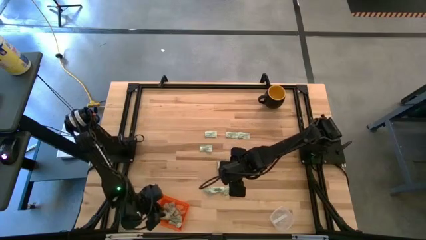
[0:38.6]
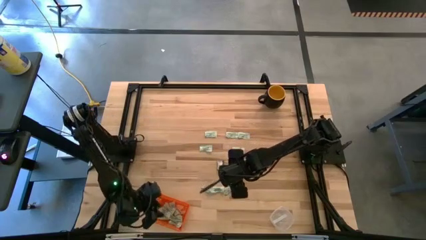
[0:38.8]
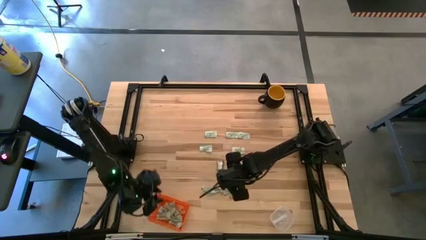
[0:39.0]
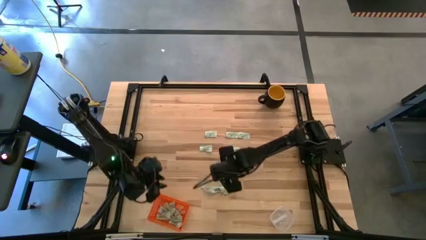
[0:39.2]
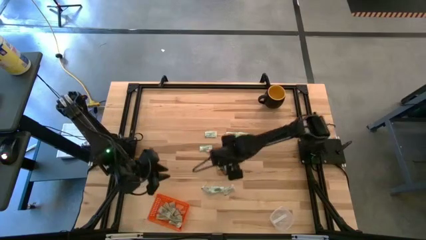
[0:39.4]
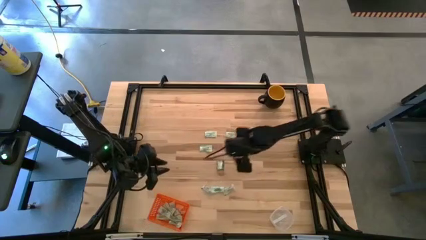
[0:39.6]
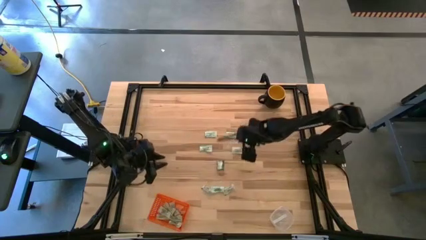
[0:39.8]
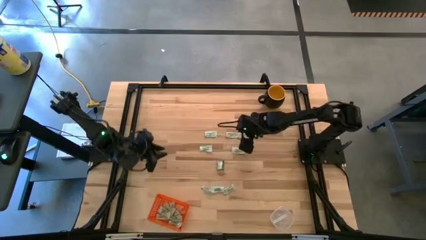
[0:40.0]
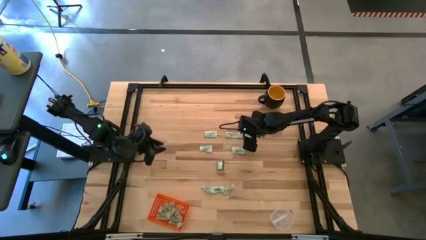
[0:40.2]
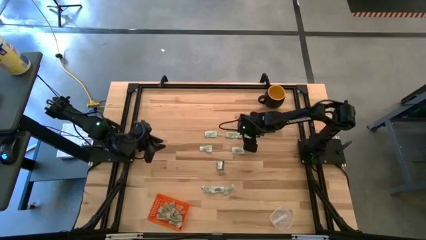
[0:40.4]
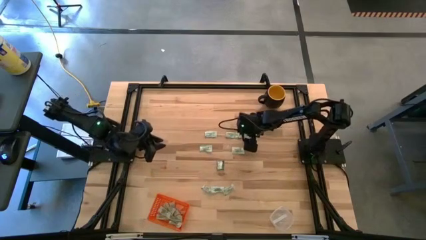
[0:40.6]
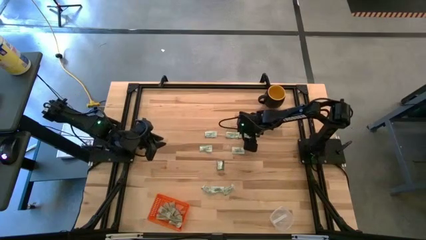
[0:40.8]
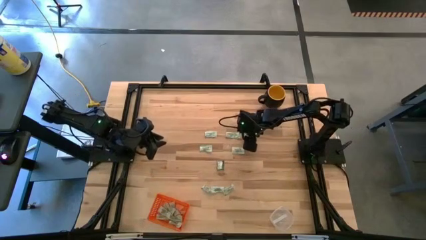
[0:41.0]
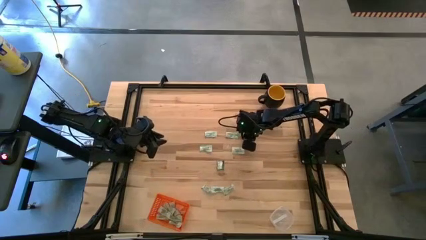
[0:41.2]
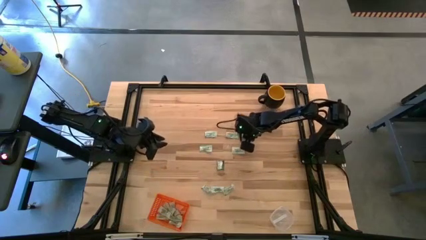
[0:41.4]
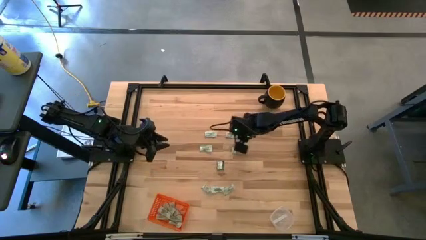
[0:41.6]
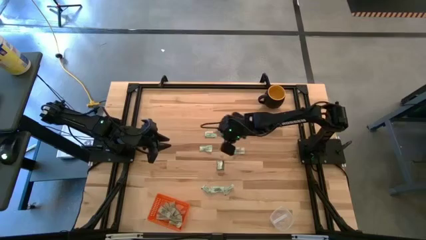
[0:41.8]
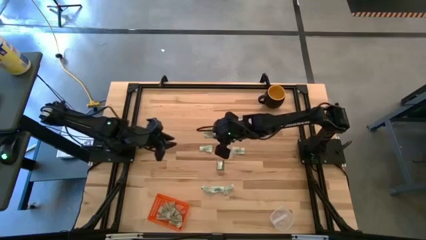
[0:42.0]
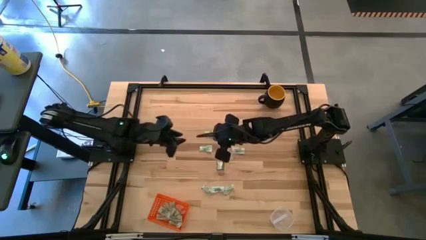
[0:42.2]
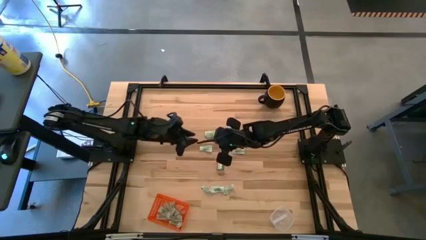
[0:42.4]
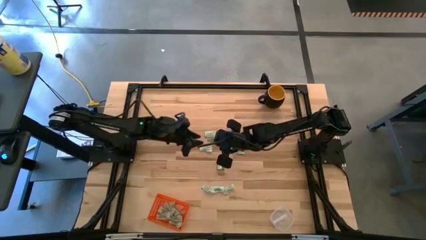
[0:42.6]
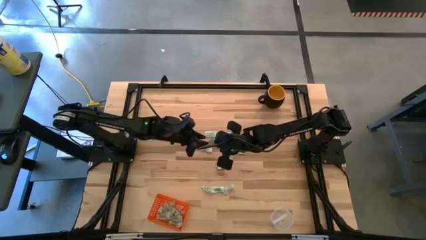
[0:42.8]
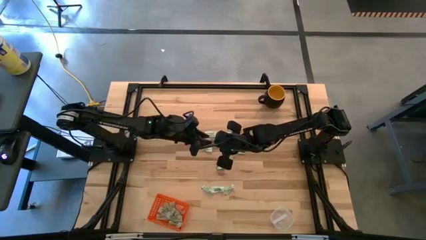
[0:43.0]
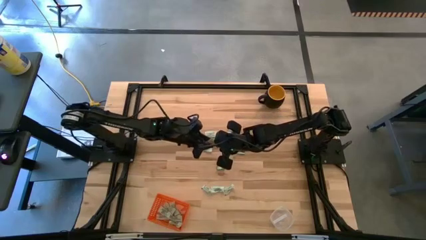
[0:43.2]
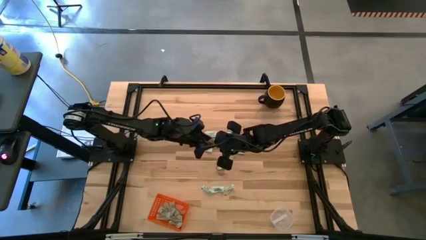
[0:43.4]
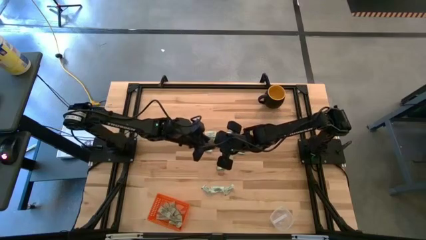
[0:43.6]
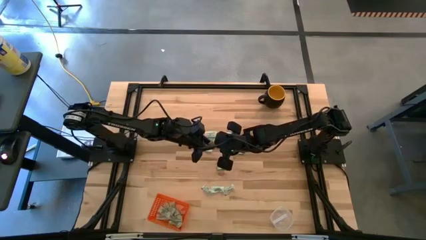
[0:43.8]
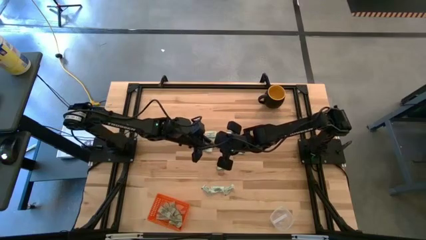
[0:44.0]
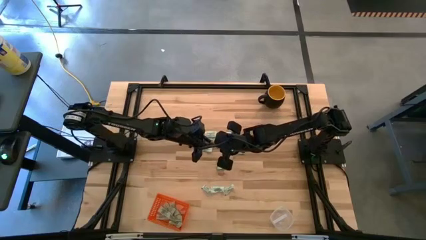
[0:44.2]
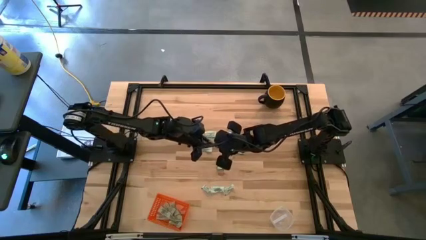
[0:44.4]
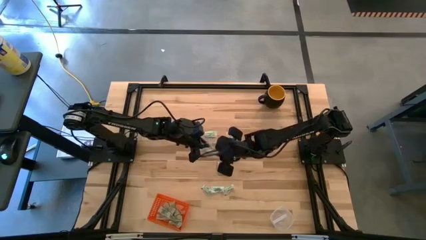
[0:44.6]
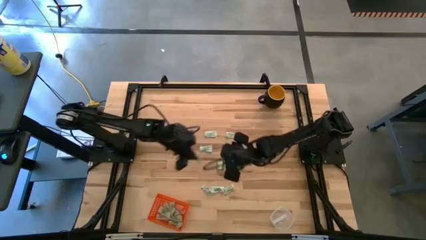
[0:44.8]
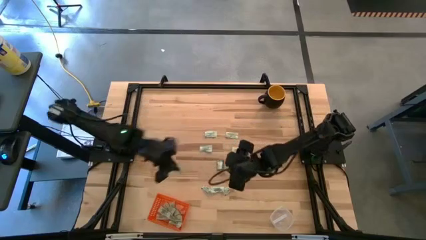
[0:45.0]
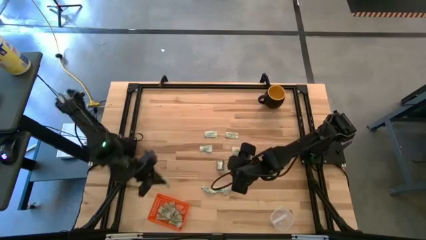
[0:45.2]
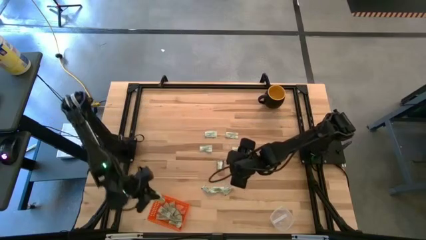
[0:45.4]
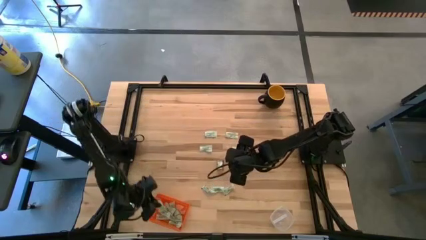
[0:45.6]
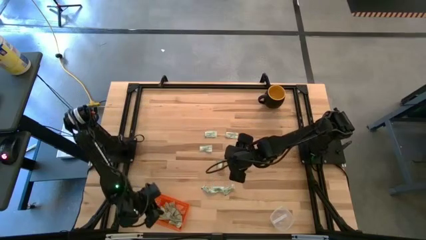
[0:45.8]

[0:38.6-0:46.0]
Task: Pick and place items into bin
Put the white stevia packet into the orange bin

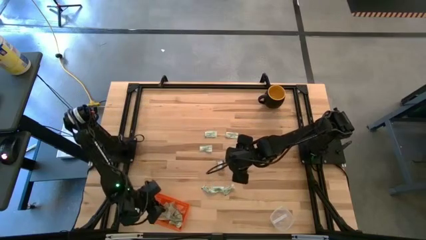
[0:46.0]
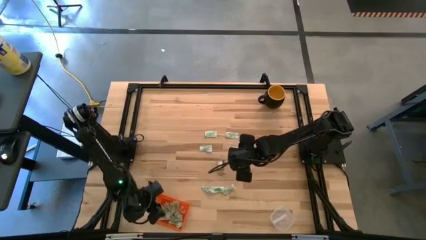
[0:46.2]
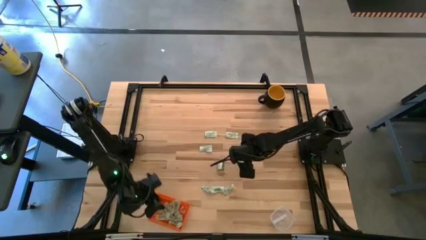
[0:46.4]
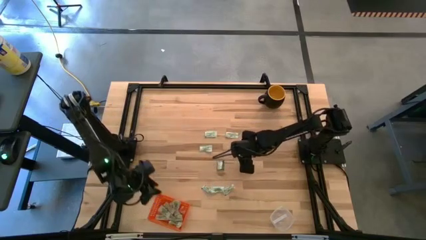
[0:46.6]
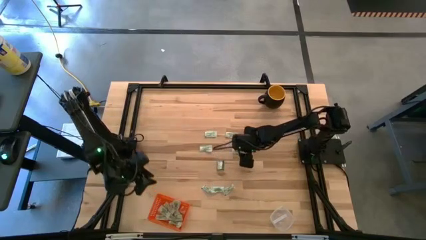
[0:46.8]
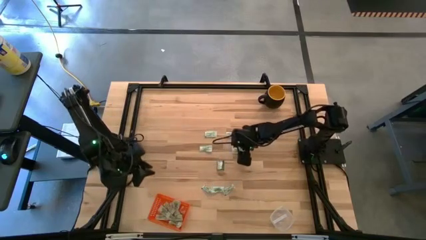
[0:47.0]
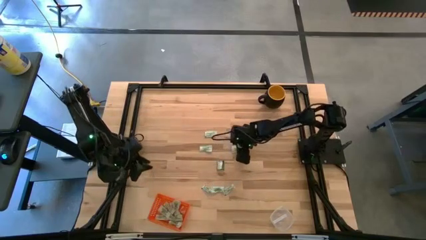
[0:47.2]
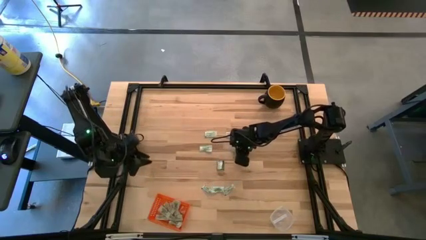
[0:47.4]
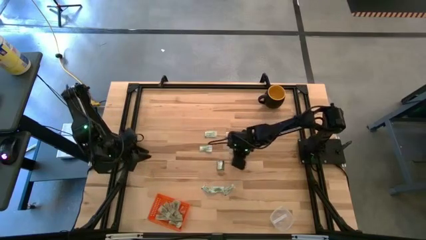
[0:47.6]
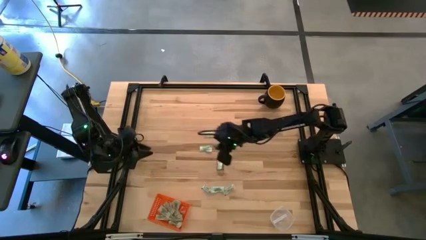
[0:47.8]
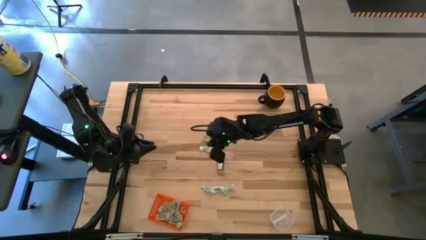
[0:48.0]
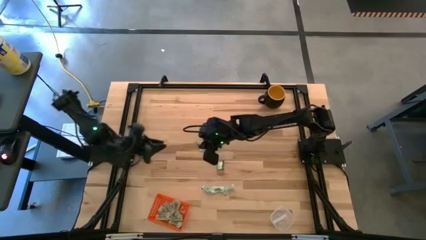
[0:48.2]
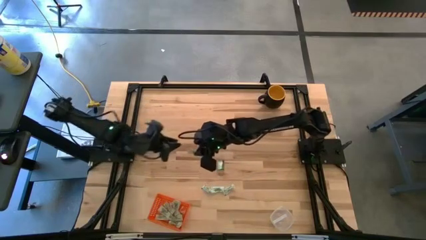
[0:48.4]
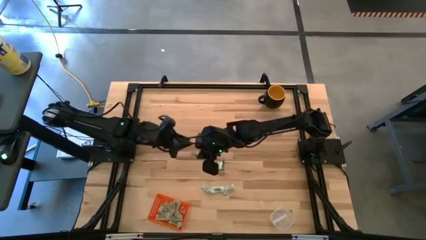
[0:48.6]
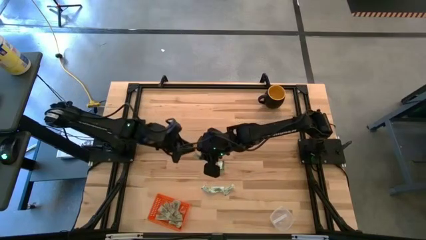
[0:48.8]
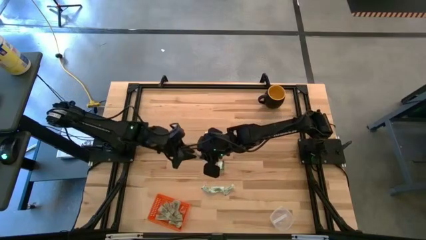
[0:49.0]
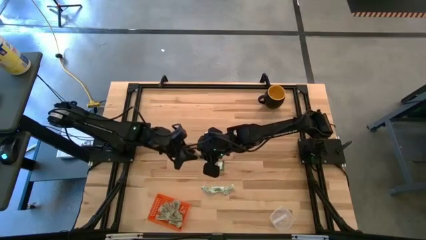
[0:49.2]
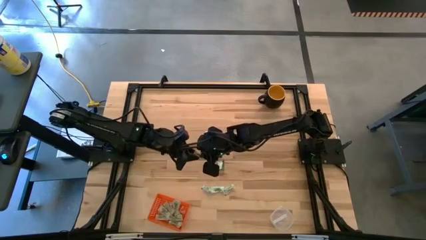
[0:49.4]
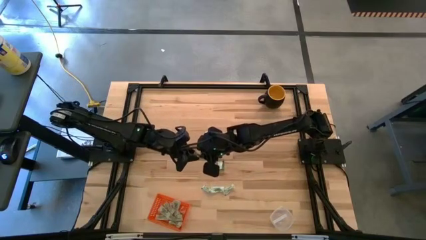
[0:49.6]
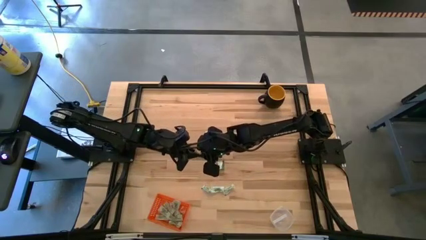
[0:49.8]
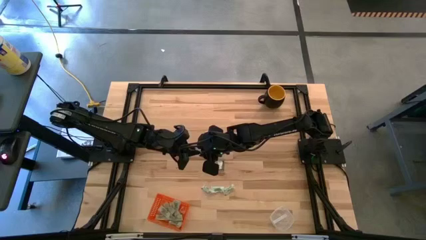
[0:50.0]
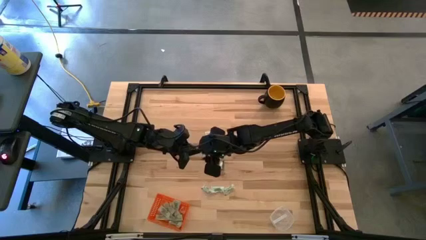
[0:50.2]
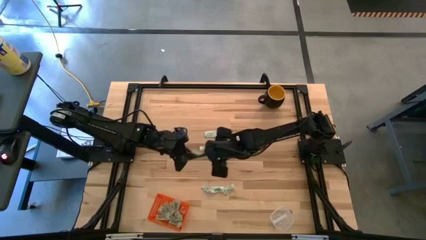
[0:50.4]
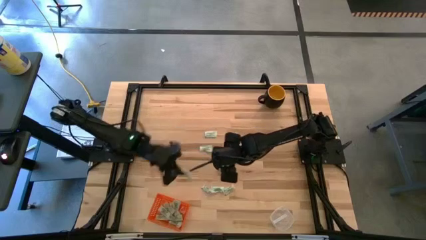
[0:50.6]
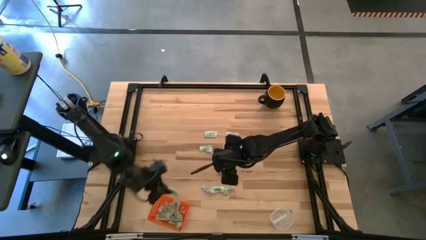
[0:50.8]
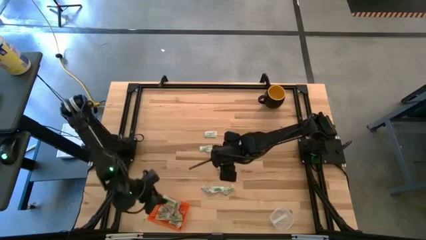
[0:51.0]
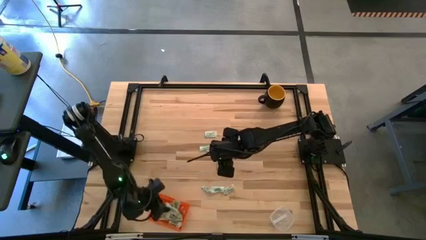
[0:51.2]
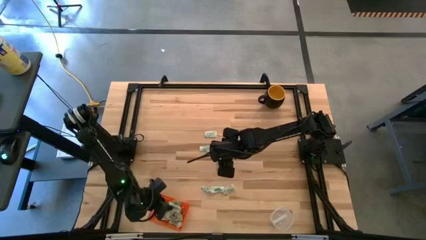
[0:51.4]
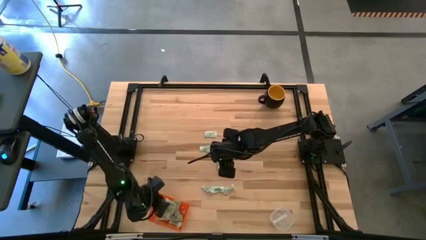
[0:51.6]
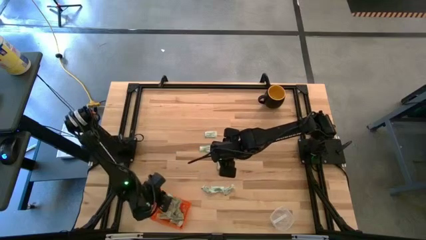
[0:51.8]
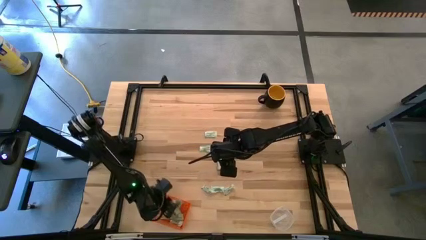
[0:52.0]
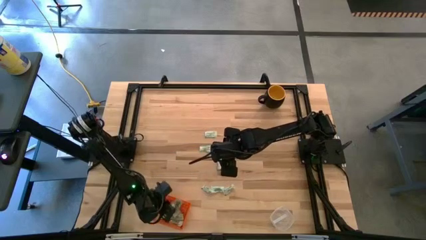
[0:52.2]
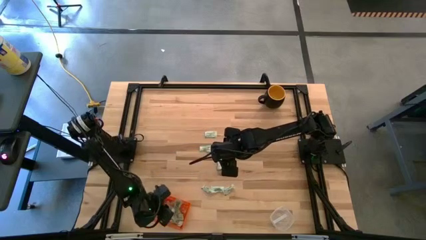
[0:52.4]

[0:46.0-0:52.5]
Put the white stevia packet into the orange bin

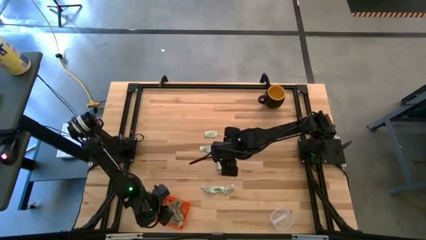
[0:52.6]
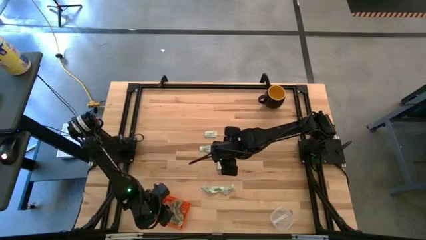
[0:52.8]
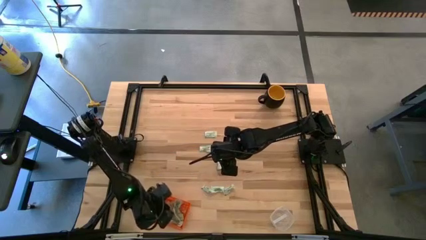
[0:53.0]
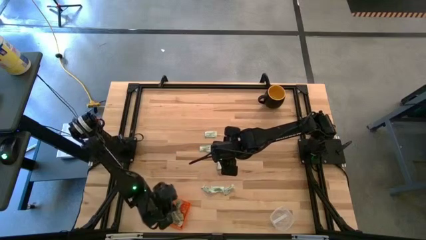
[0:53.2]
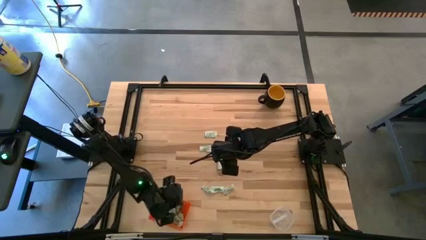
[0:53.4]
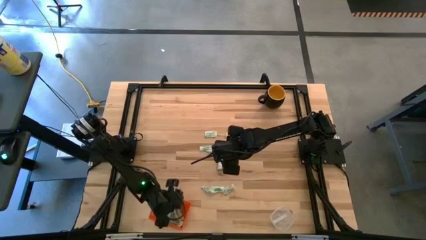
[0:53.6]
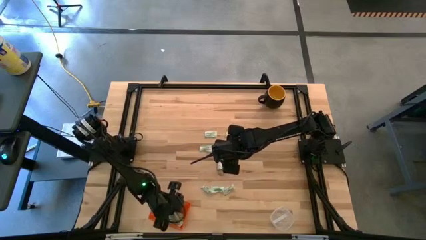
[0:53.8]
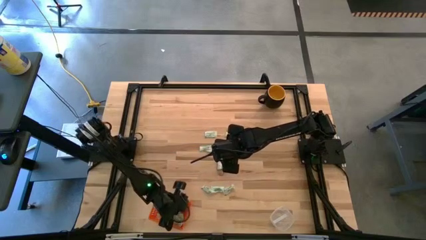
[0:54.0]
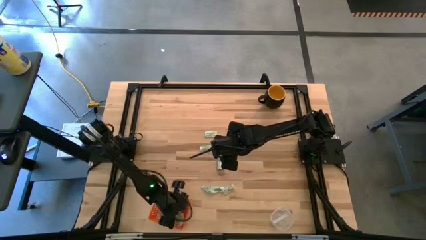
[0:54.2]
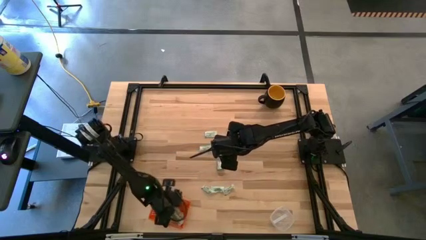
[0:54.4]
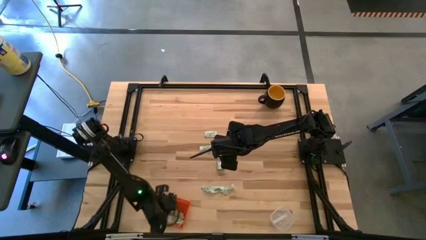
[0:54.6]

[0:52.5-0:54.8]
Adjust the white stevia packet on the orange bin
